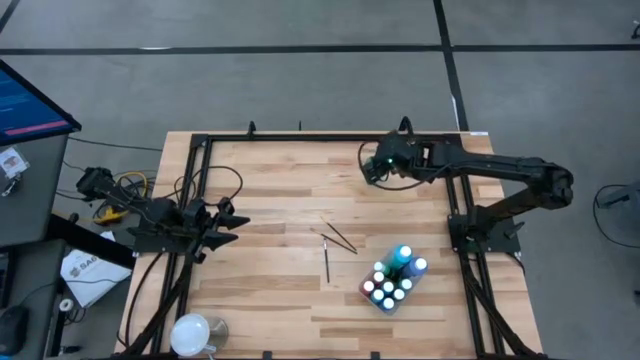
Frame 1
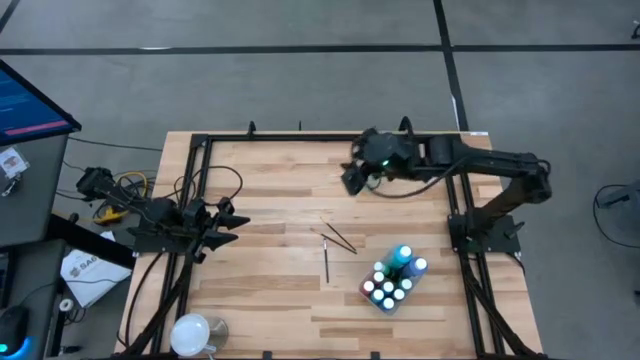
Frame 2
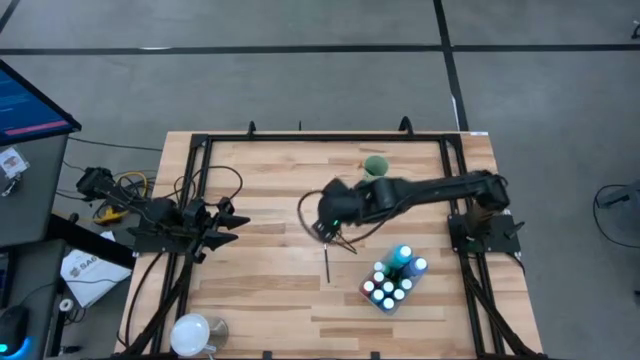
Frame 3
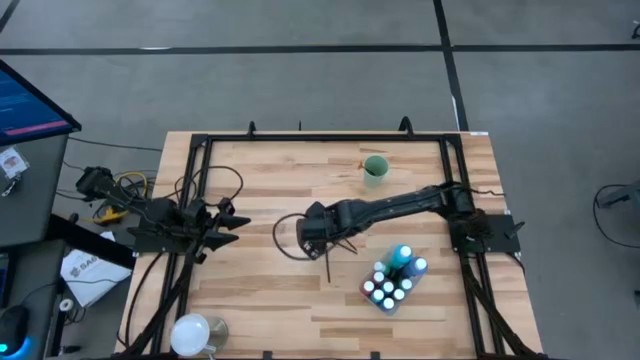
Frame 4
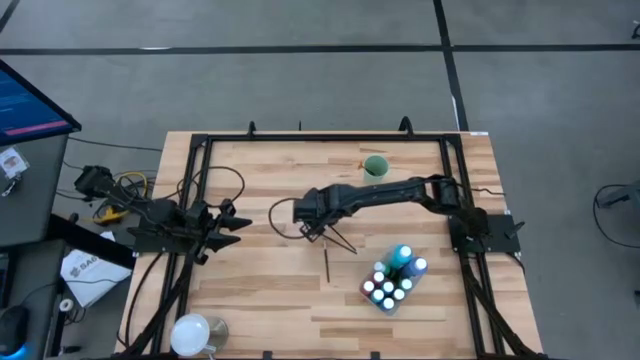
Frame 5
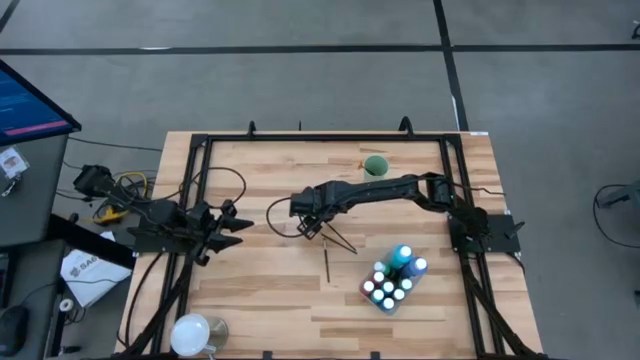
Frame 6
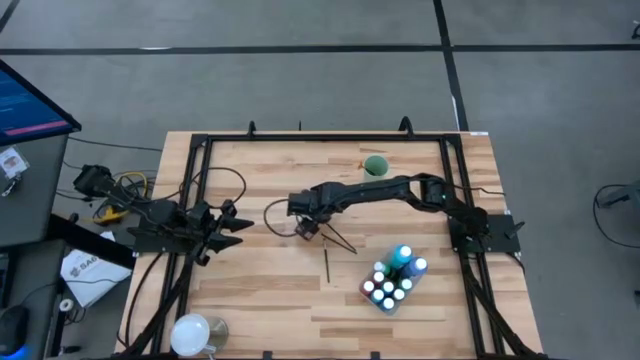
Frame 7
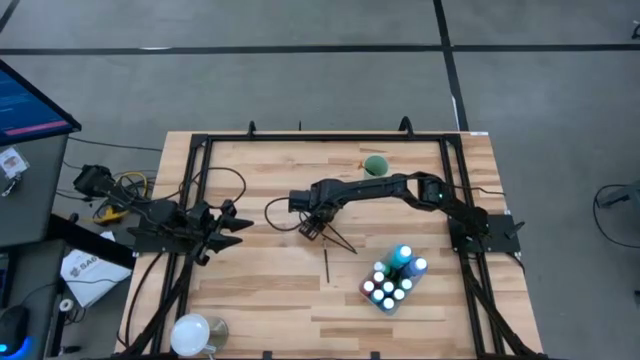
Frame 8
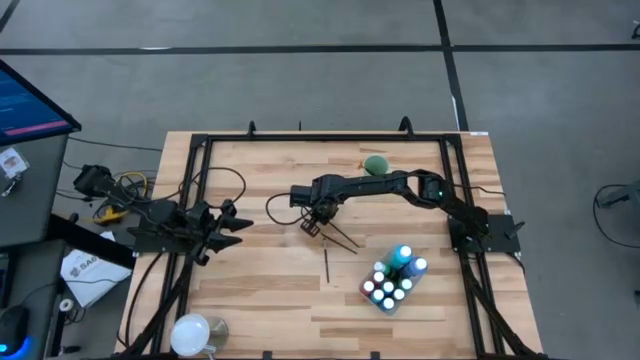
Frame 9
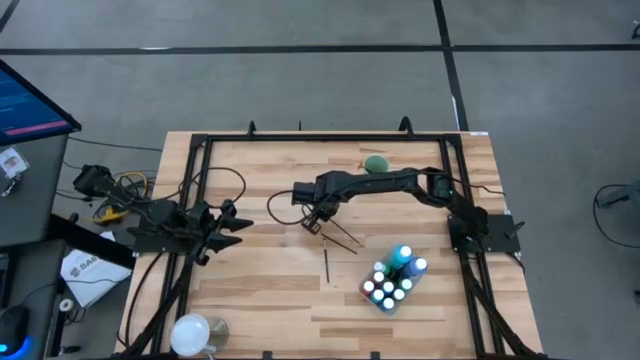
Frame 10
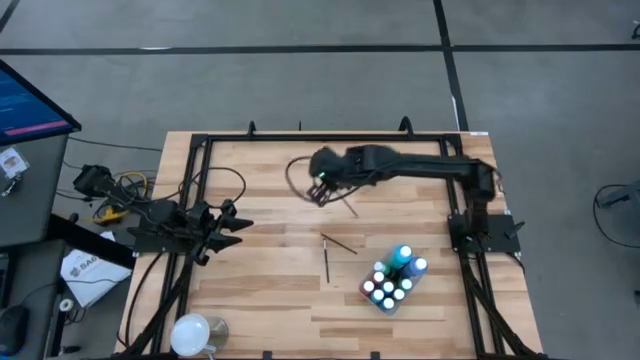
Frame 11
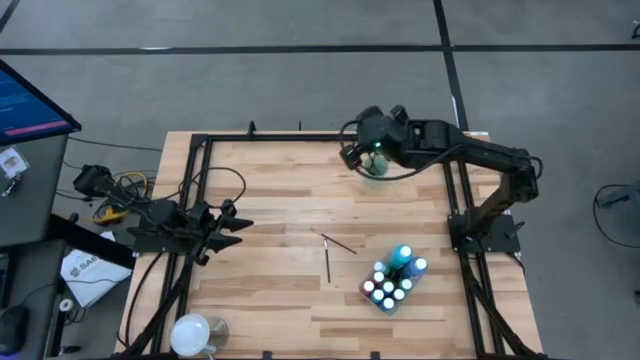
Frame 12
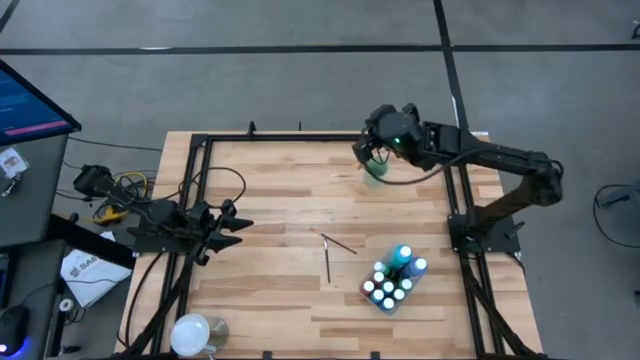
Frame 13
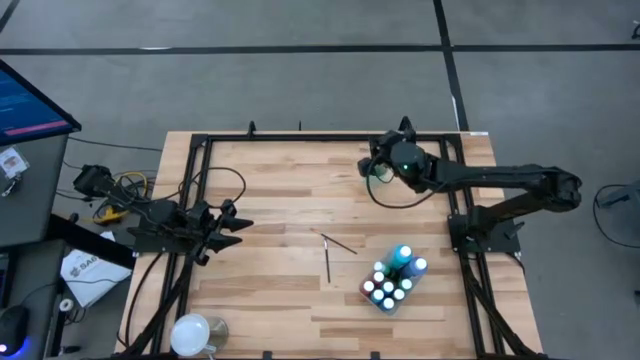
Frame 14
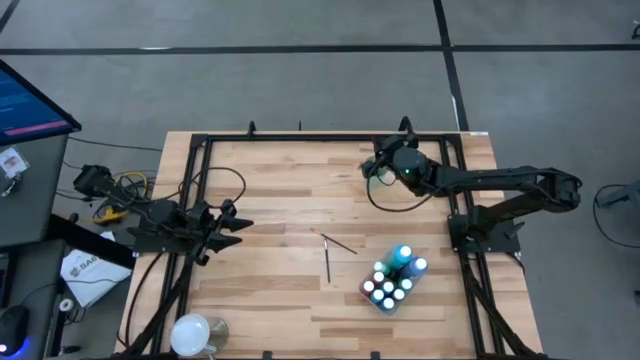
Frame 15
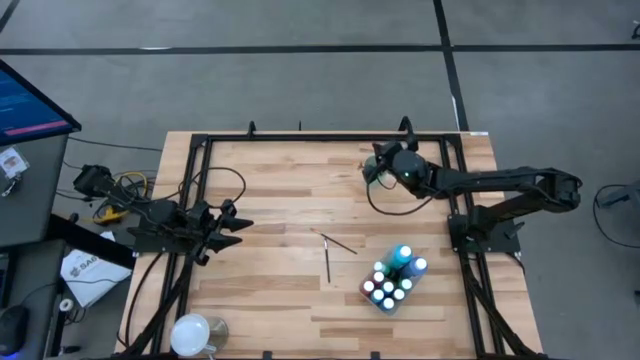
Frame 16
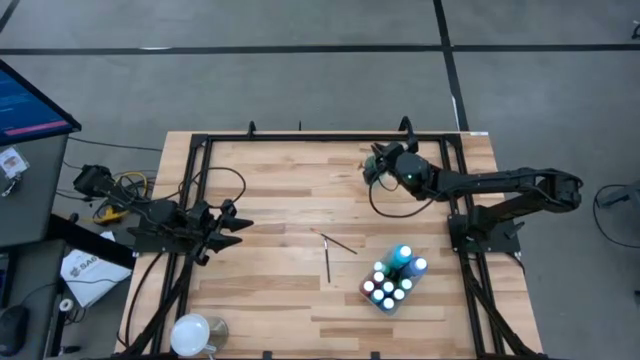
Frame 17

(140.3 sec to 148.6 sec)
Task: Pick & Place Paint Supplies
Put the black paint brush into the green cup

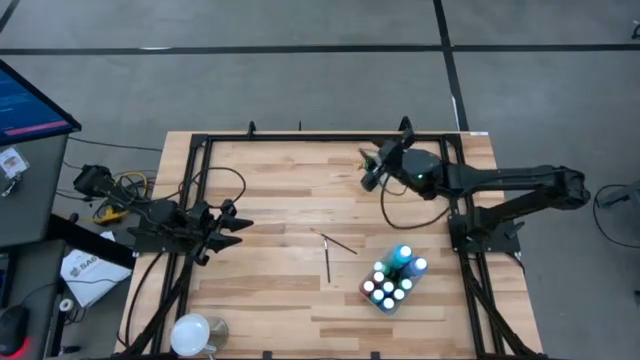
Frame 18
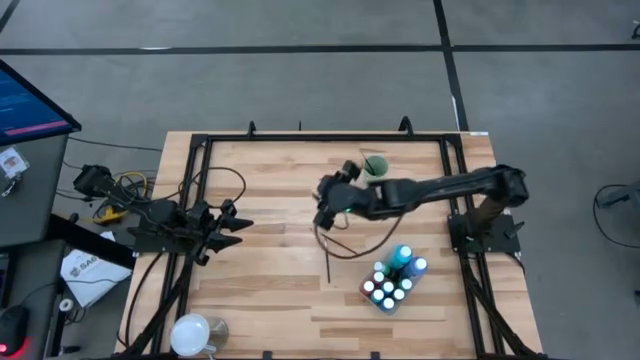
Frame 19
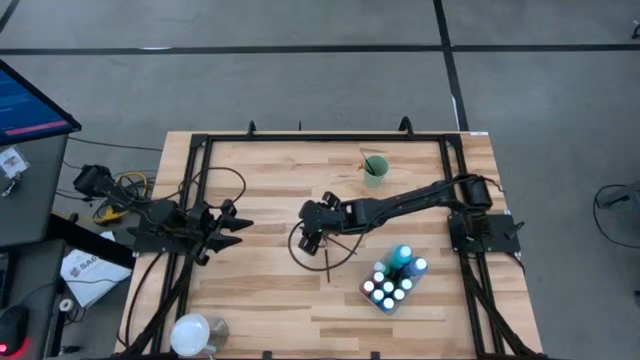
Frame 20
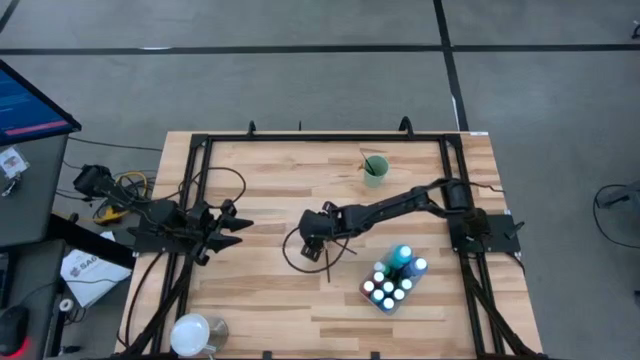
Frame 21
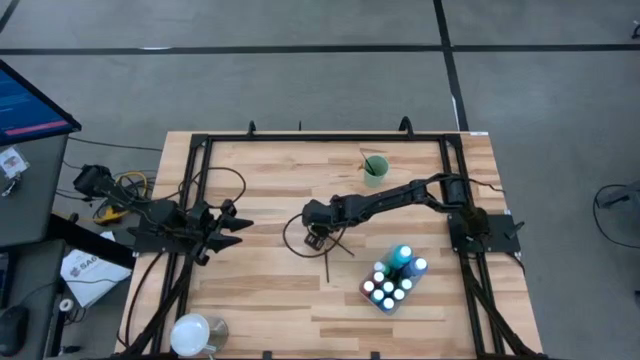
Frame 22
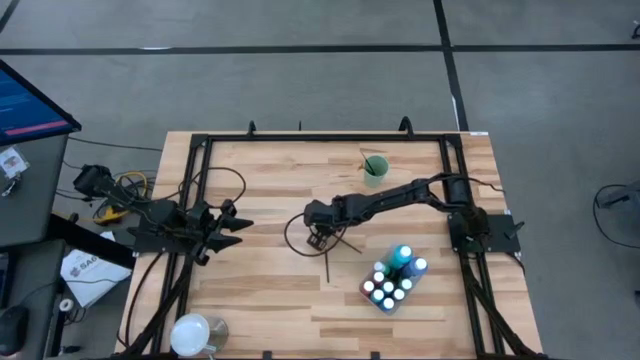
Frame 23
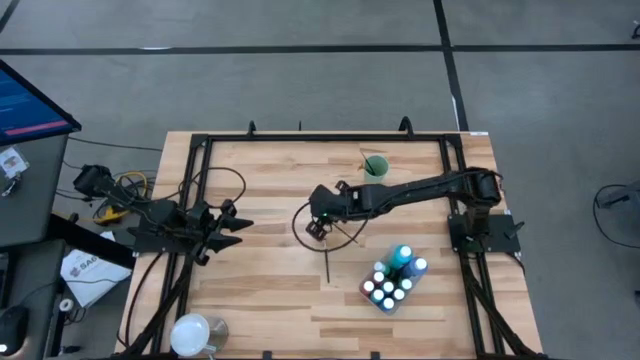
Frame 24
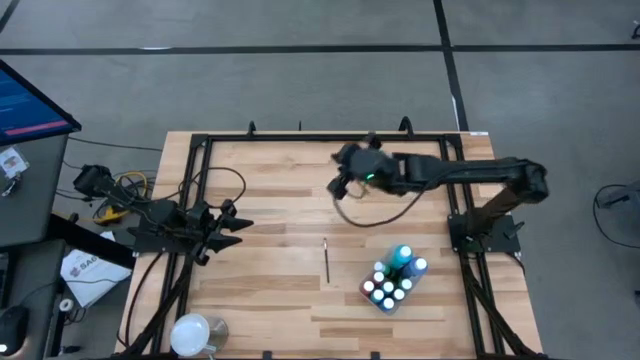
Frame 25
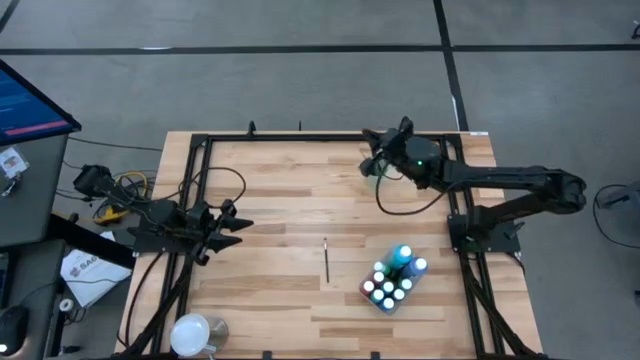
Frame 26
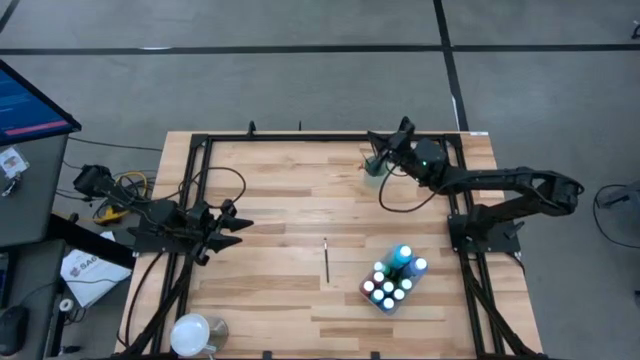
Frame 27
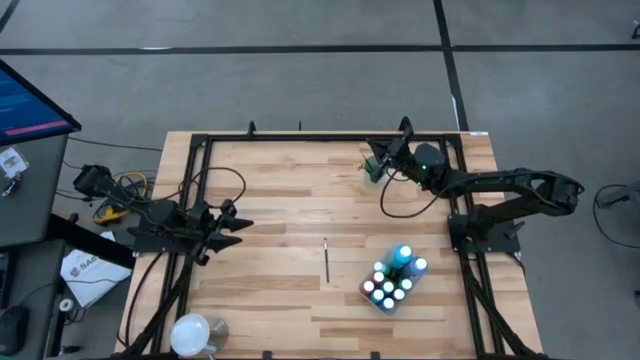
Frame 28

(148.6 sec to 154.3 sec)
Put the black paint brush into the green cup
